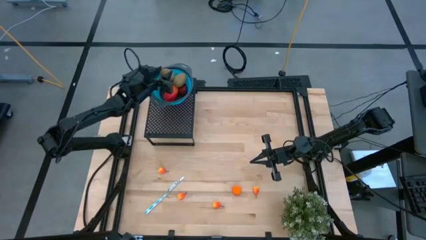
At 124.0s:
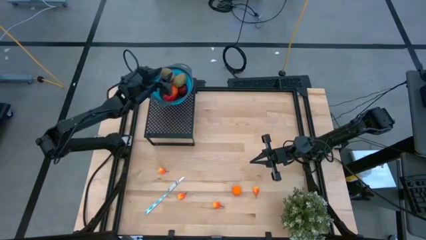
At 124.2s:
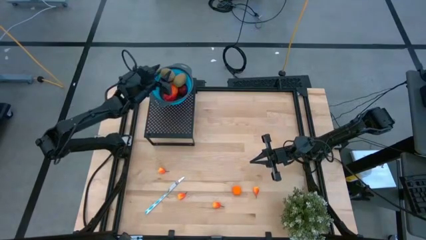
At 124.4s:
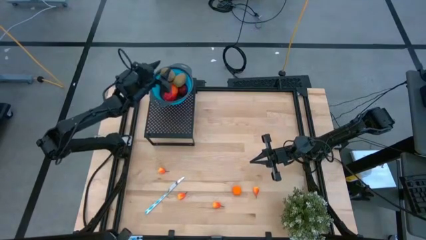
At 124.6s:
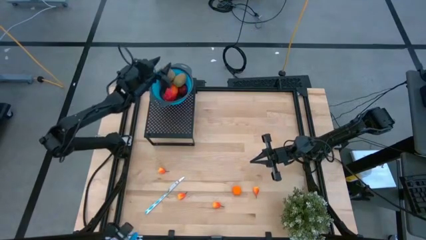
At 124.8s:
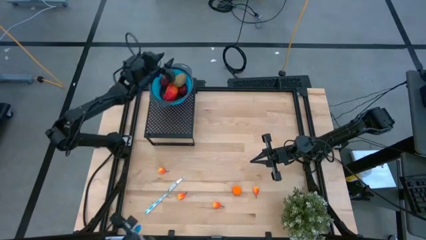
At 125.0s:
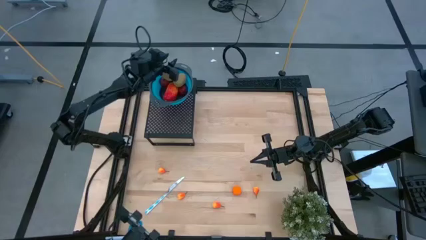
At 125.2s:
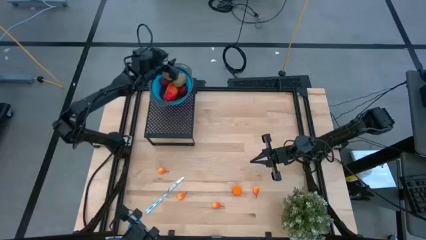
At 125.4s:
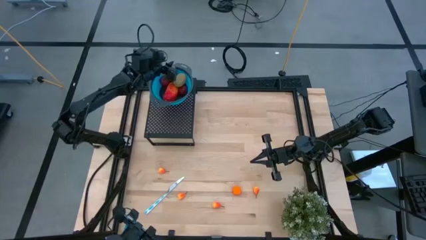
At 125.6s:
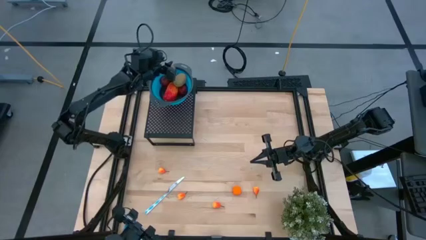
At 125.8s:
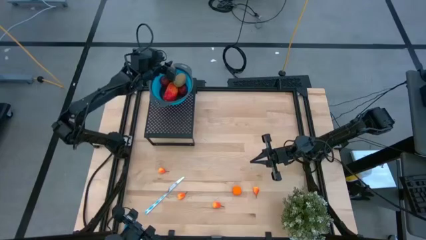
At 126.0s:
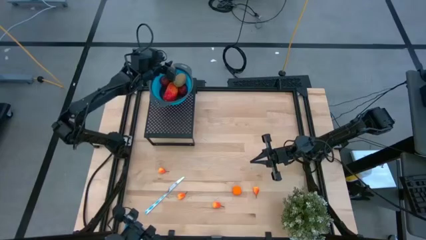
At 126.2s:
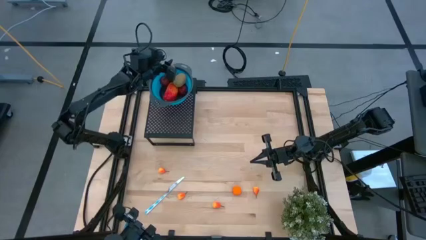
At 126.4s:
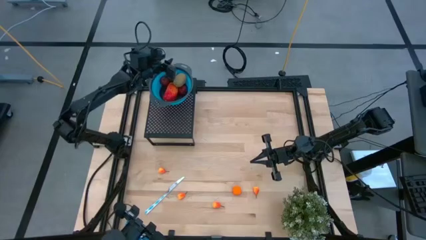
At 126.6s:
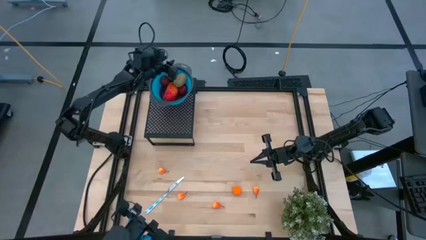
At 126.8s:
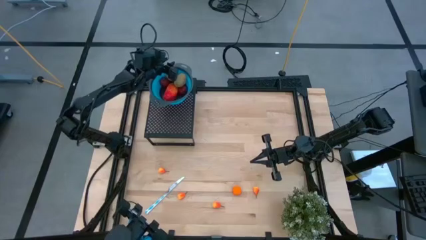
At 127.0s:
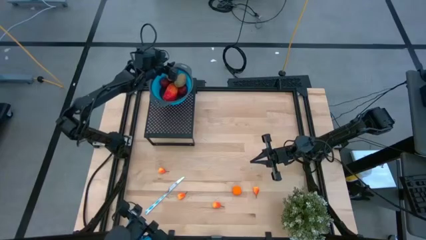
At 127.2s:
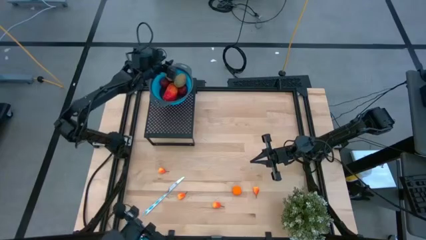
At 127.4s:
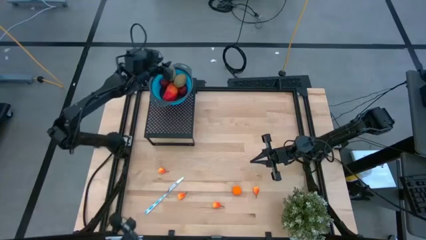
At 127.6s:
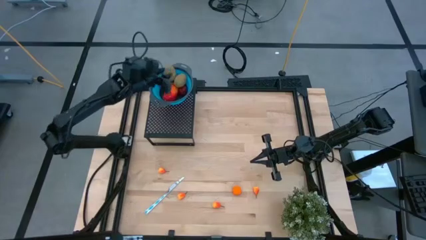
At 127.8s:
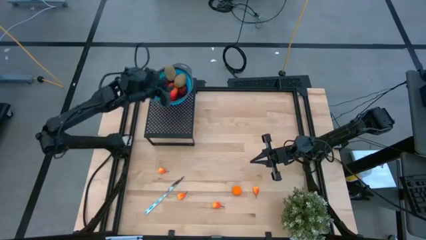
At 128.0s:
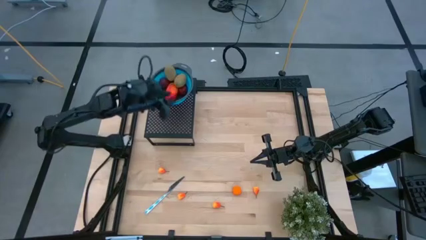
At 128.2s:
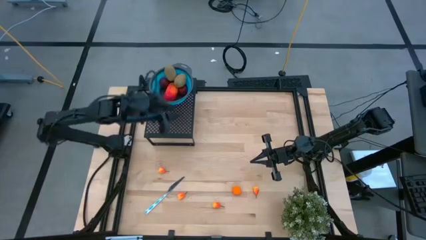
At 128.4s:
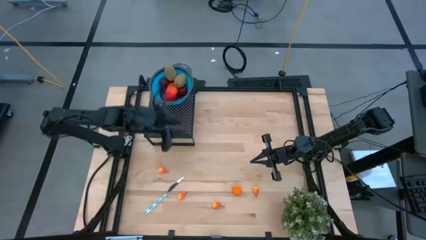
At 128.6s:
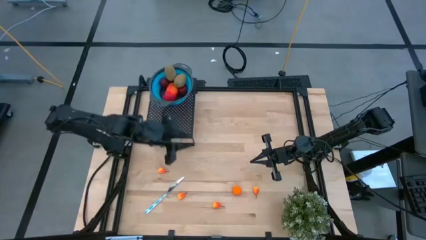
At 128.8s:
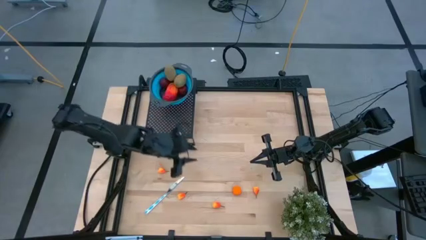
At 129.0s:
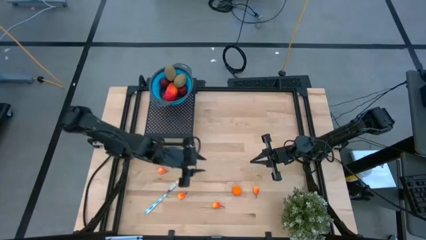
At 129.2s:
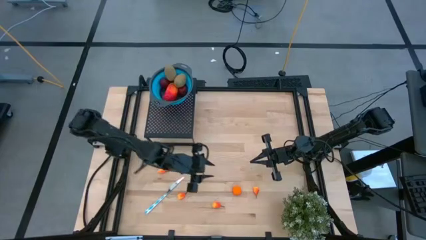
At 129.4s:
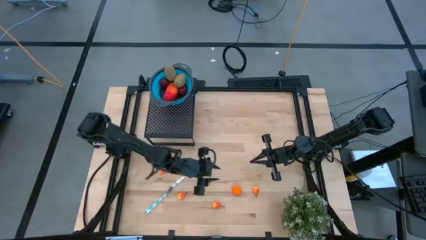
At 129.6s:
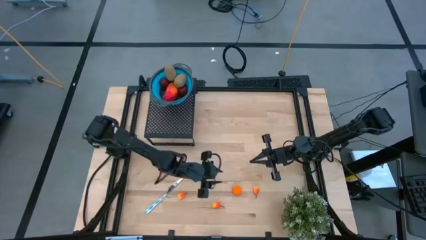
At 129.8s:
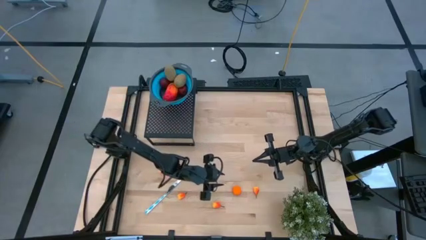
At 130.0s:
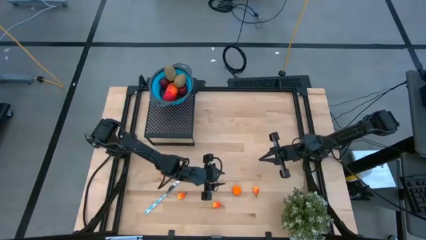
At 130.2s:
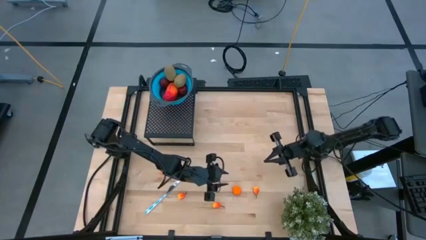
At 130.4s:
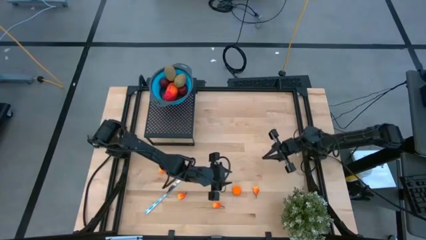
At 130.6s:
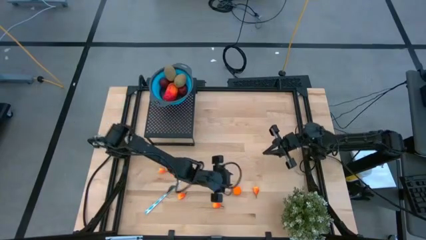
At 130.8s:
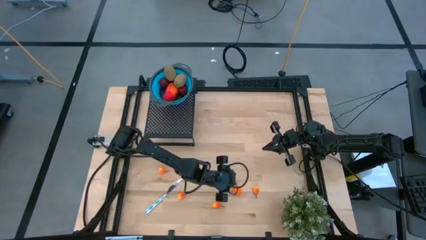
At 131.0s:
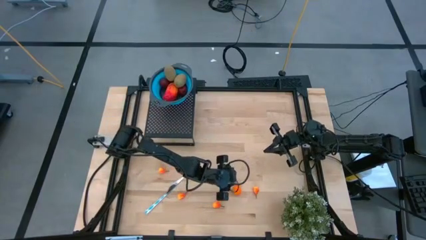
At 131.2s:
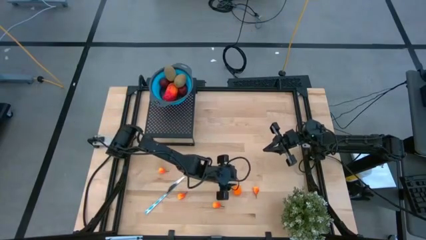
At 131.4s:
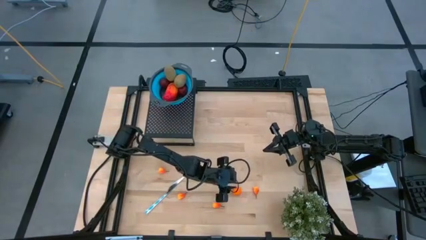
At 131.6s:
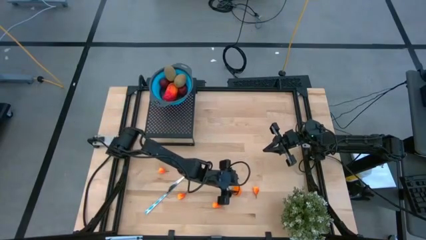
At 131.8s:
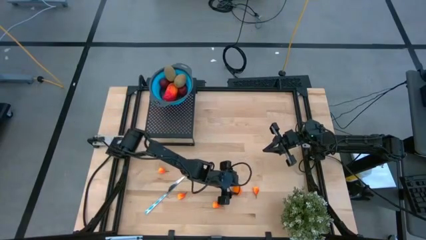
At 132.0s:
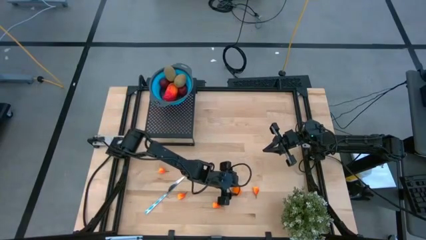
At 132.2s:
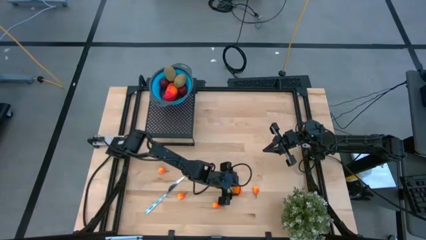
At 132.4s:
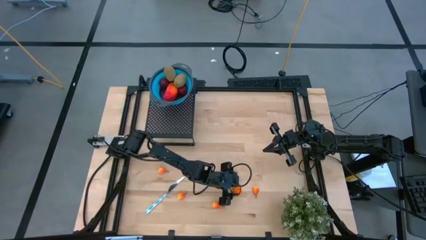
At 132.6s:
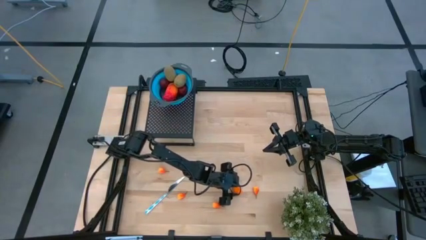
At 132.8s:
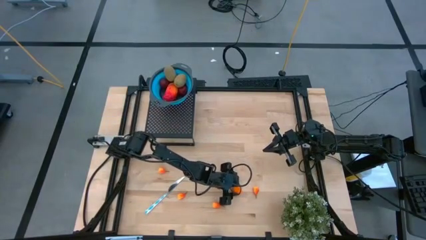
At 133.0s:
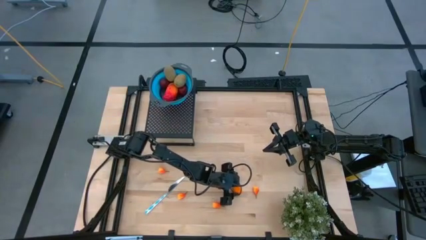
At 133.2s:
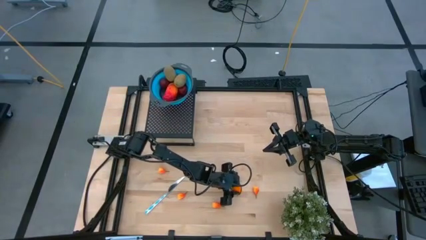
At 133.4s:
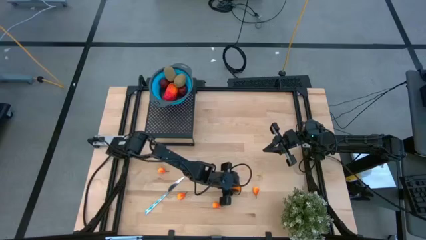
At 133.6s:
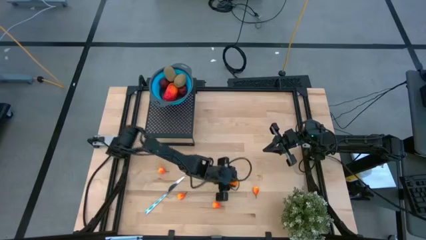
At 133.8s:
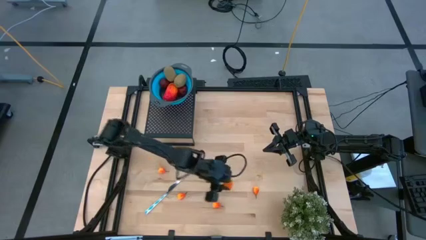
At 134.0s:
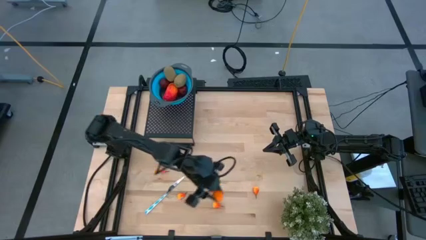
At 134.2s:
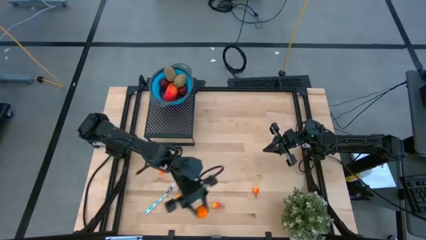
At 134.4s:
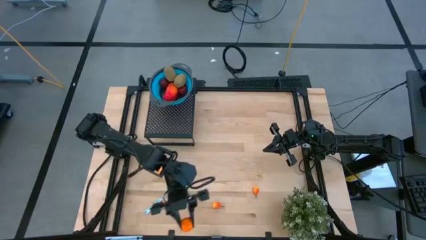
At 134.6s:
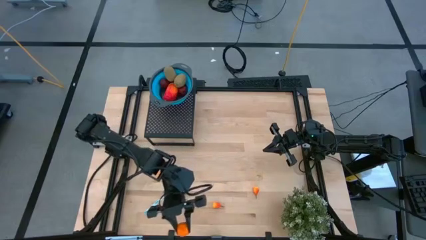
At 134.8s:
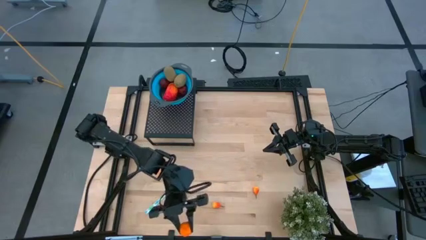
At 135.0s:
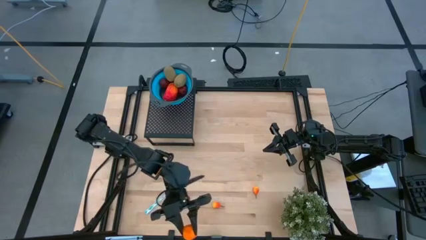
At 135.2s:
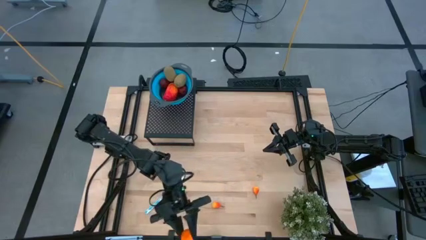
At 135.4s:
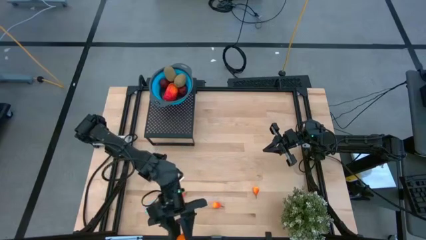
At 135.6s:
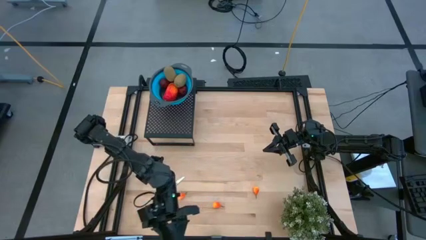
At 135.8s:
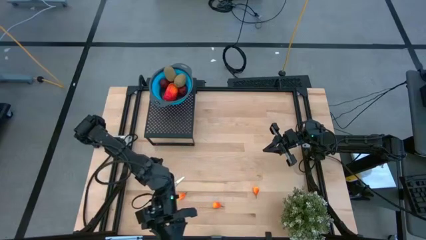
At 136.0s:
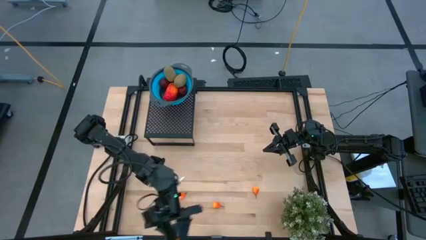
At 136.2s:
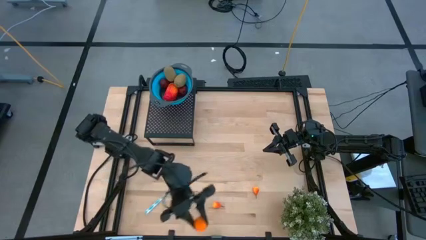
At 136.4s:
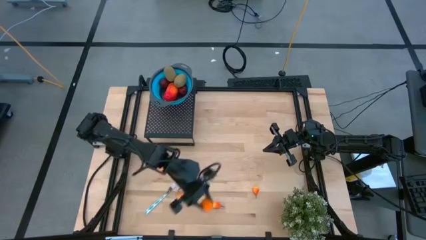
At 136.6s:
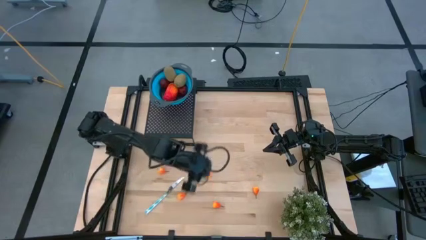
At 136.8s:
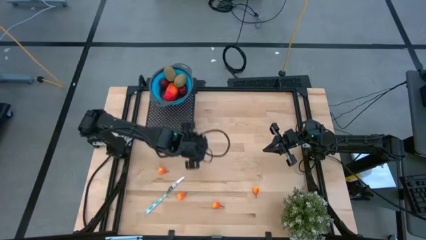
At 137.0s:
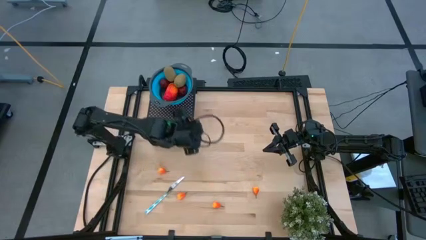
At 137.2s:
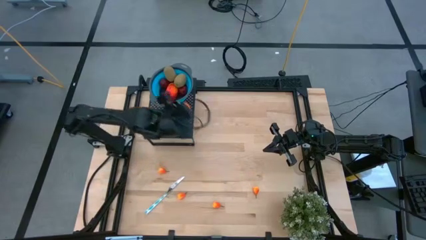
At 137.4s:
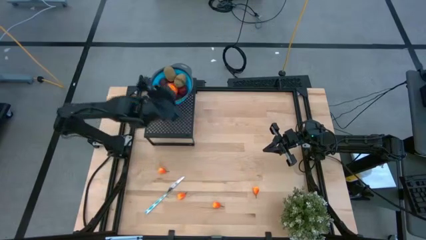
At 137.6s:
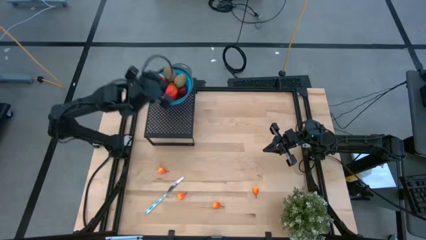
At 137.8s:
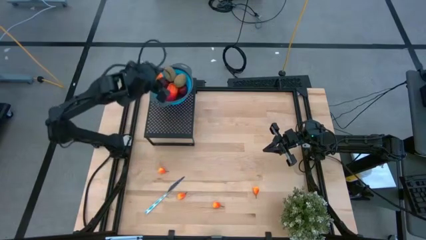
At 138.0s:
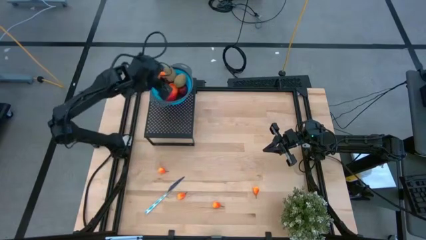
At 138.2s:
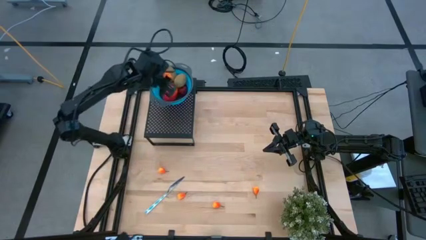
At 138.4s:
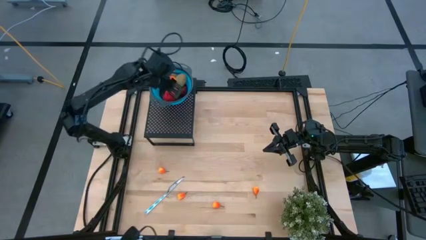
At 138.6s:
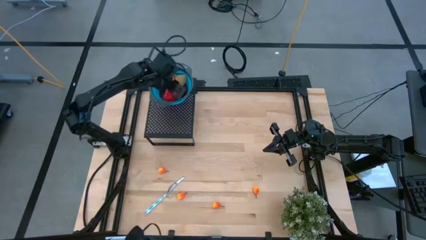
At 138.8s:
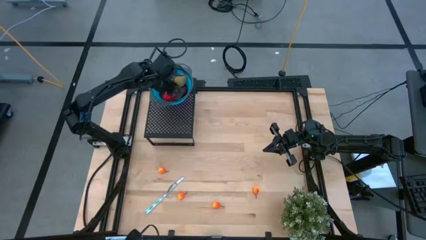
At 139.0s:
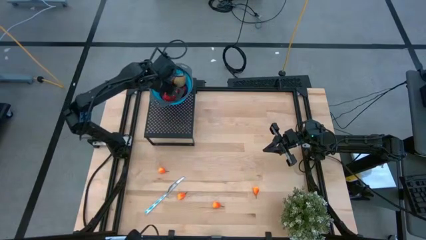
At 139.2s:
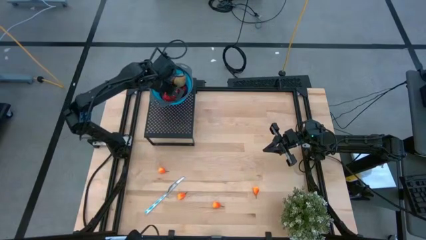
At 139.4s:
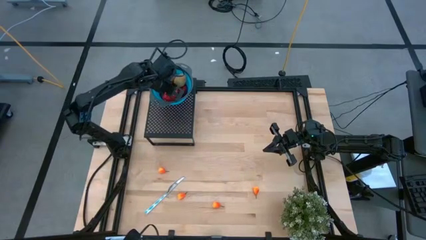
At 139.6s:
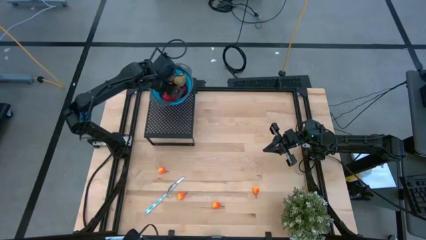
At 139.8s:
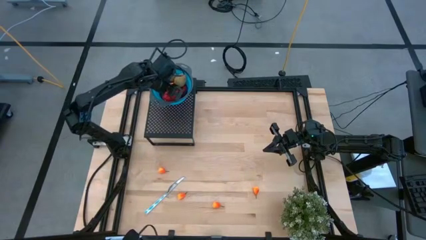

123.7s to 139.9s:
Task: Pick & Place Fruit
Put the tangerine into the blue strainer bowl on the shelf

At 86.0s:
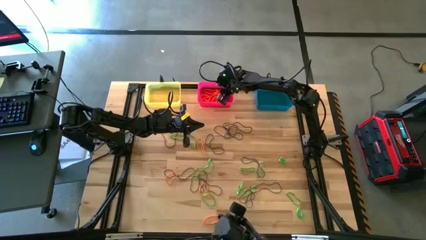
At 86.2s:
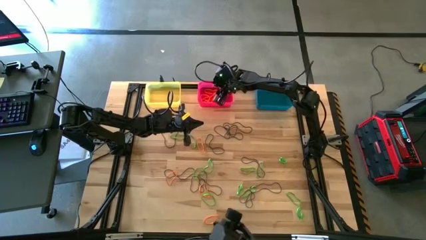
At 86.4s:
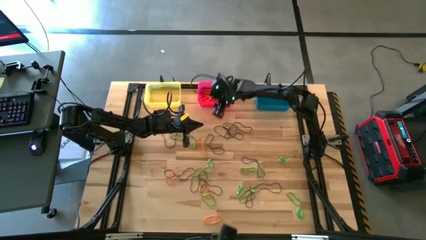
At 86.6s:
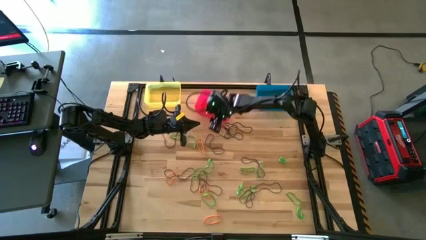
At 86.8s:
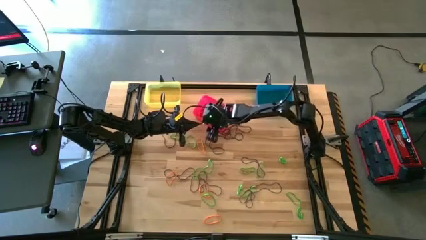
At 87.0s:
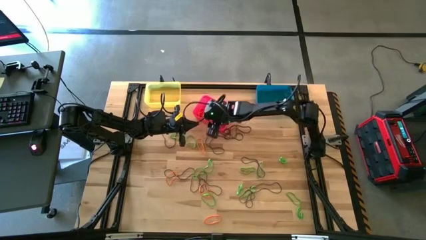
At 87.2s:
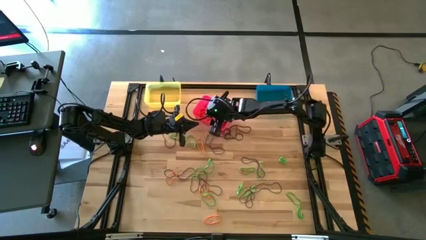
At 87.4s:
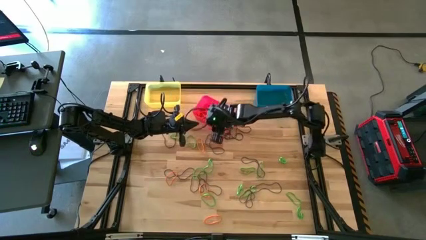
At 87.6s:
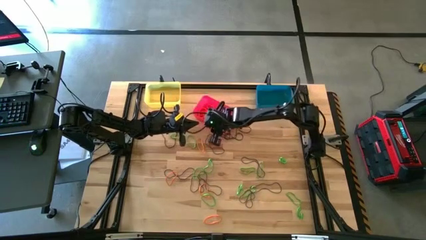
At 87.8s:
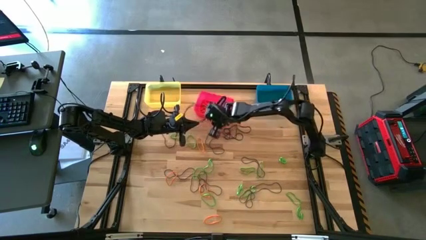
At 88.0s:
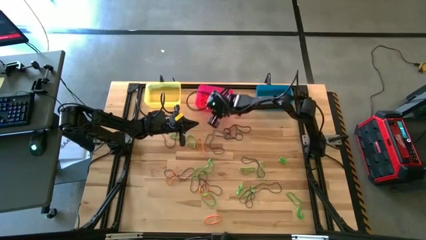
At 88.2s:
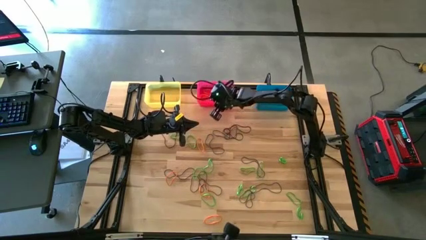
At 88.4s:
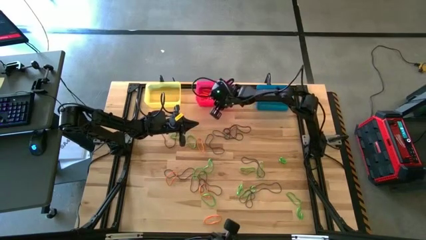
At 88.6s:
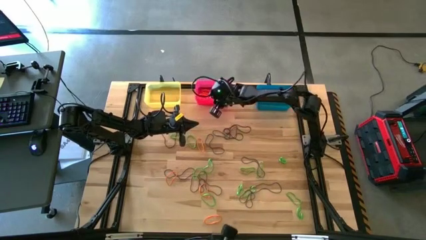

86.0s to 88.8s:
Task: Sort rubber bands into baskets
Adjust the pink bin
